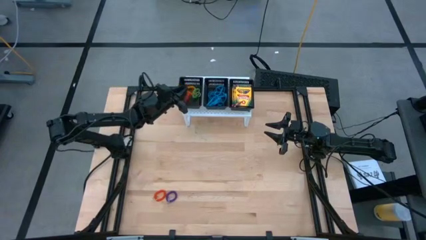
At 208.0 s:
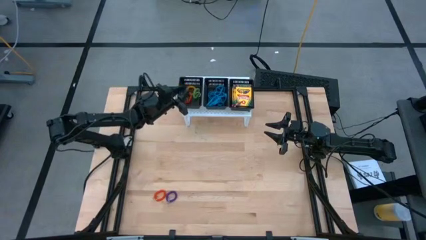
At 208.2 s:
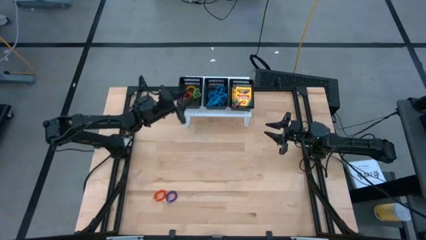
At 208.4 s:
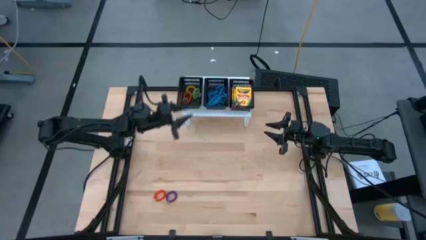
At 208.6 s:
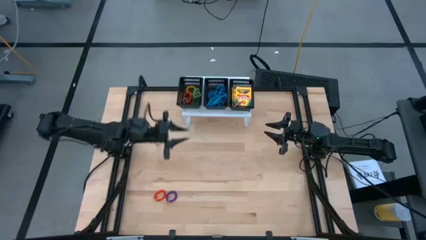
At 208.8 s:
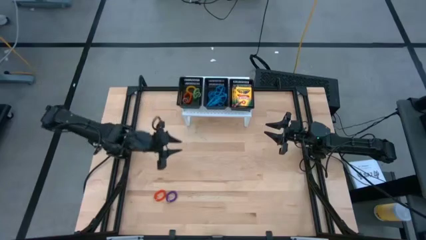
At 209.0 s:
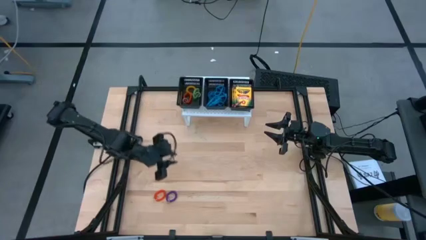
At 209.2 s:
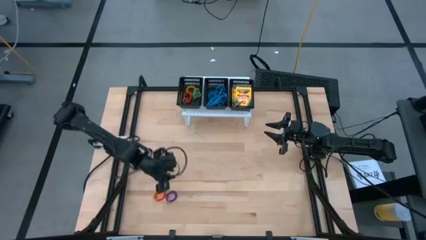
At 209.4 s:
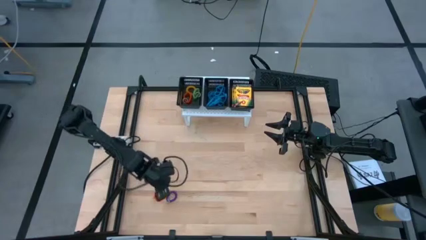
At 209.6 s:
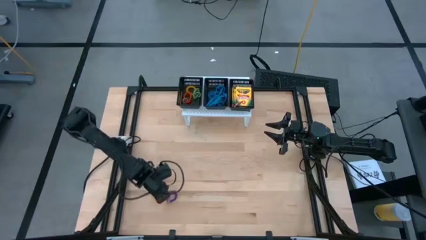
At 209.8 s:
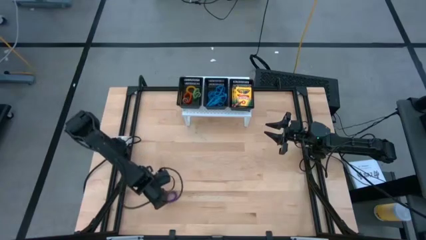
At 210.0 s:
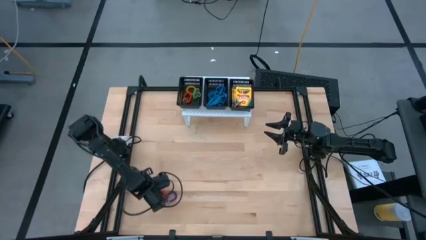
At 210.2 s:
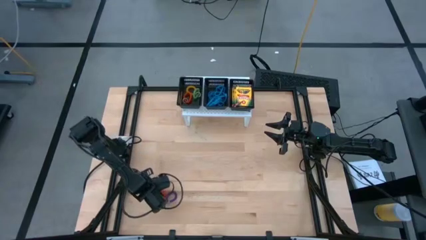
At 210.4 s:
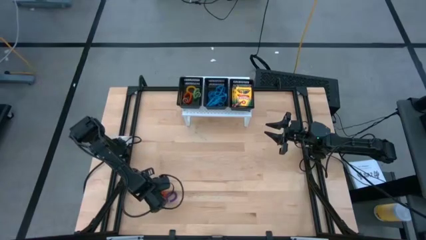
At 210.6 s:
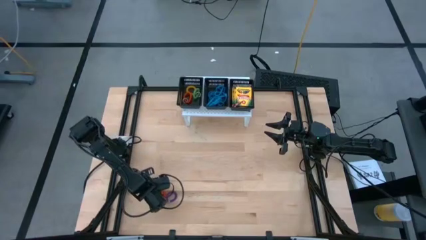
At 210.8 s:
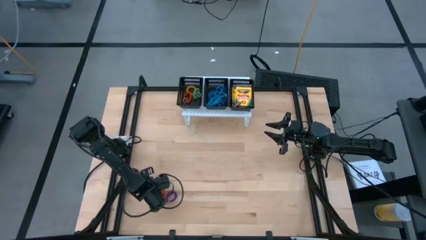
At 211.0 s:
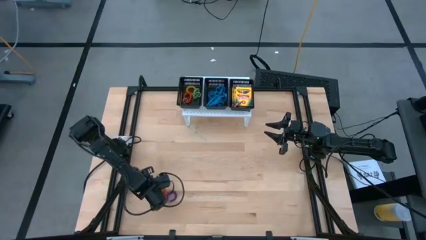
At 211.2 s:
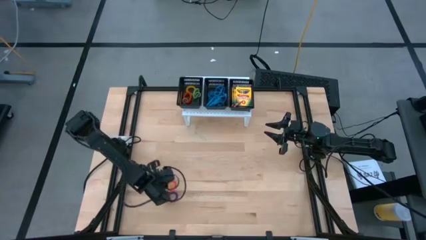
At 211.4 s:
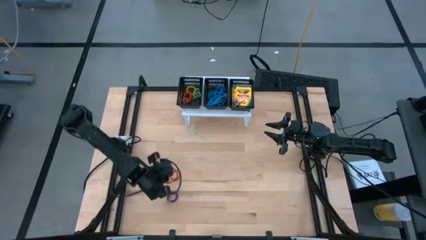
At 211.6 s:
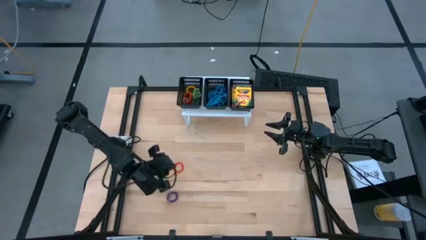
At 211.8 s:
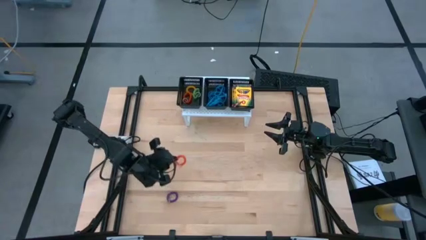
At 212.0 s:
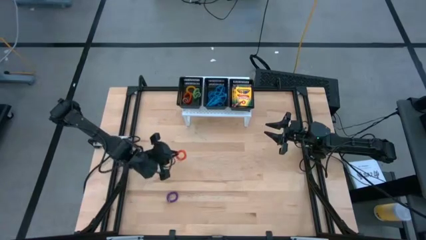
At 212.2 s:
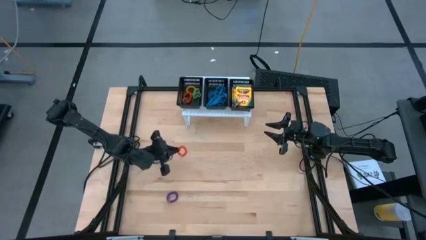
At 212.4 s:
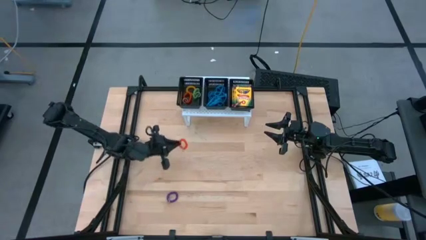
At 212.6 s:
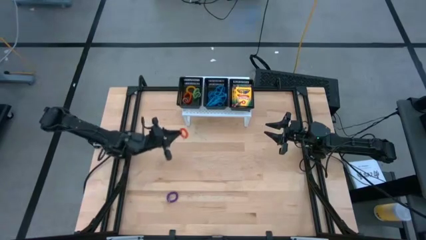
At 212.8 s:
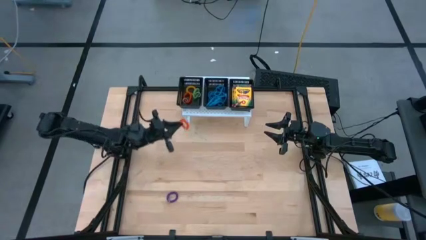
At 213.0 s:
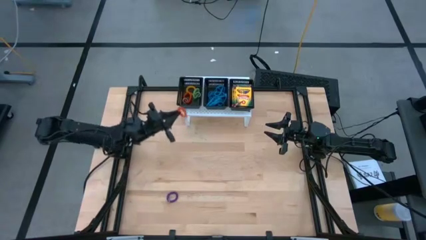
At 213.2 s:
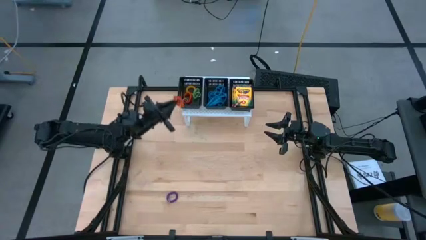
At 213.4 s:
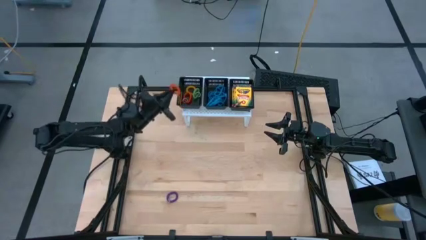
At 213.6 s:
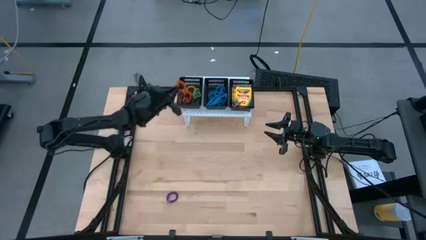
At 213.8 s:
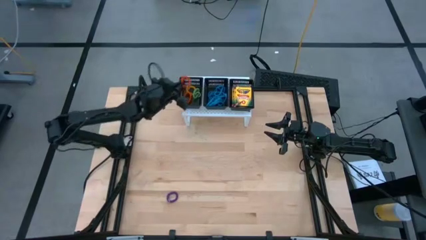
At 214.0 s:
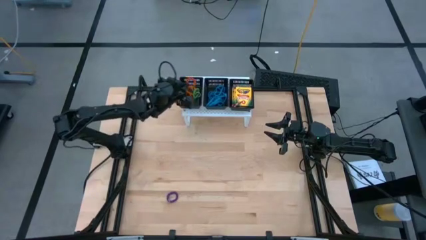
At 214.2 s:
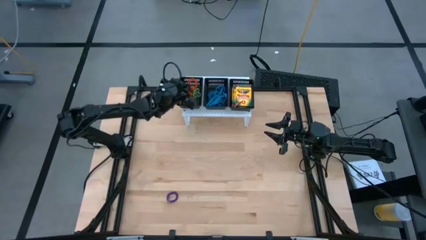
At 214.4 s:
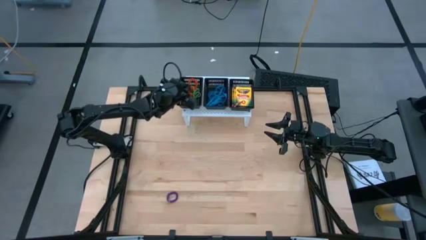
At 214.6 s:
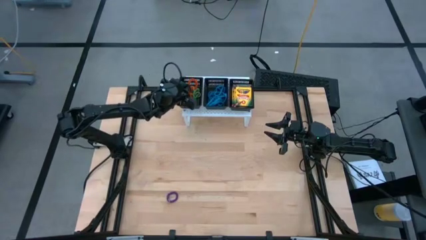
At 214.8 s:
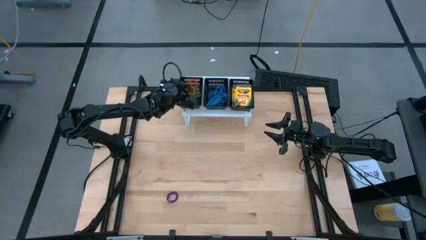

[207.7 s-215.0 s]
Task: Pick & Place Office Desk Supplies
Put the orange spring keychain into the left black bin

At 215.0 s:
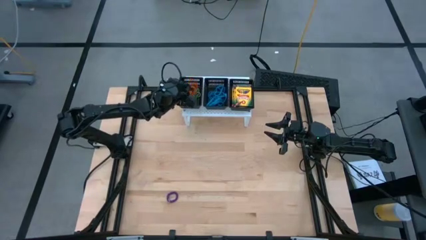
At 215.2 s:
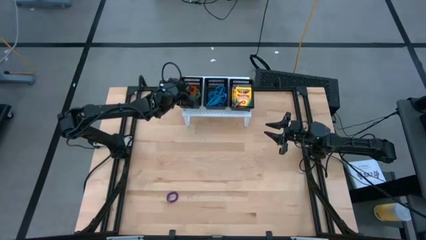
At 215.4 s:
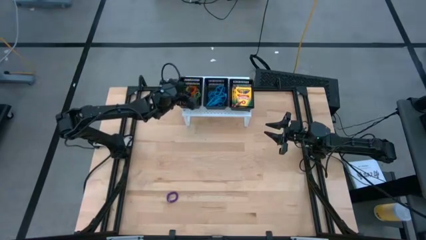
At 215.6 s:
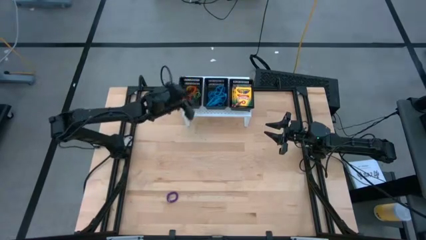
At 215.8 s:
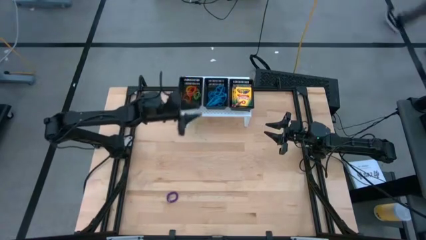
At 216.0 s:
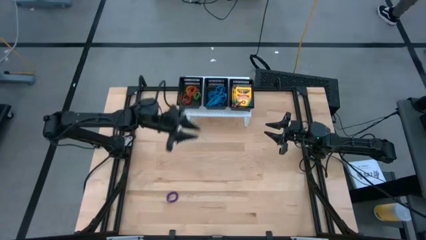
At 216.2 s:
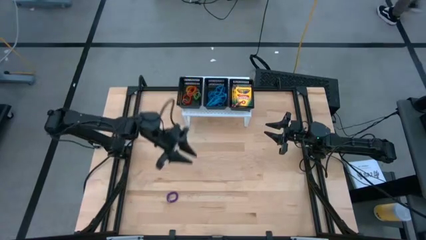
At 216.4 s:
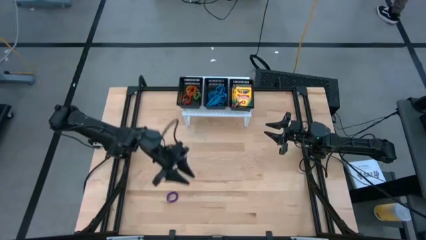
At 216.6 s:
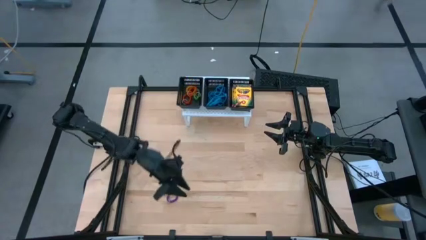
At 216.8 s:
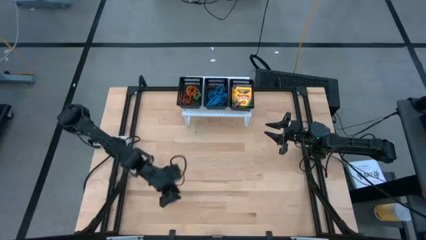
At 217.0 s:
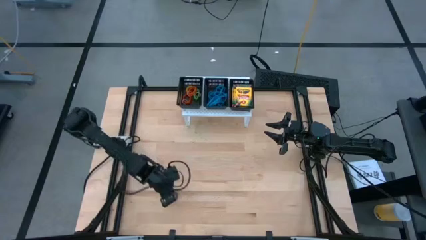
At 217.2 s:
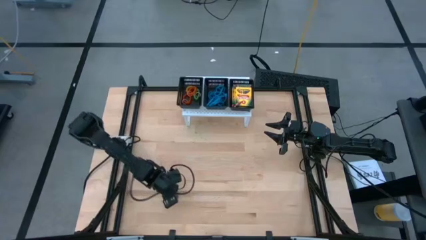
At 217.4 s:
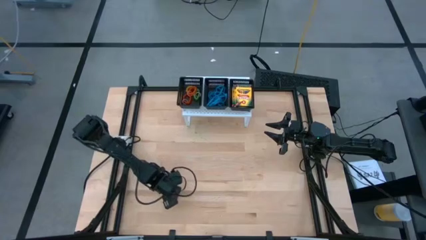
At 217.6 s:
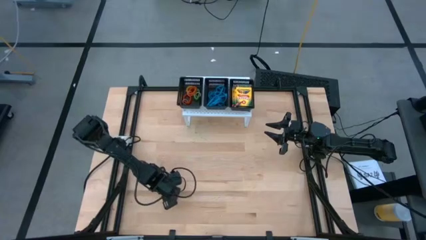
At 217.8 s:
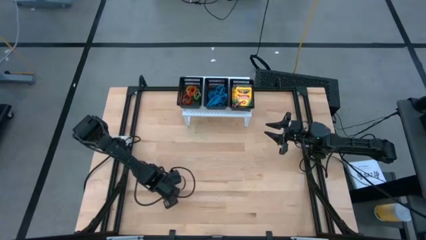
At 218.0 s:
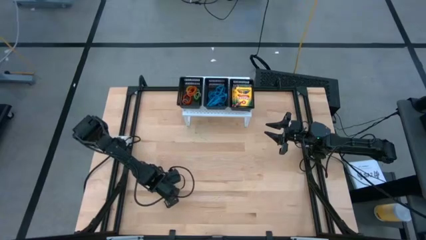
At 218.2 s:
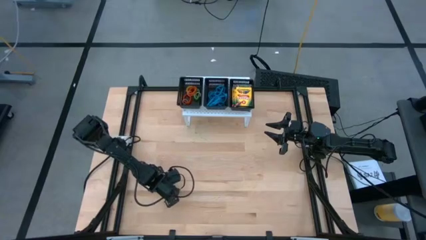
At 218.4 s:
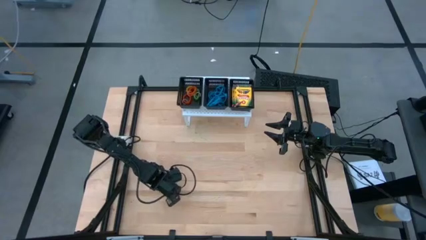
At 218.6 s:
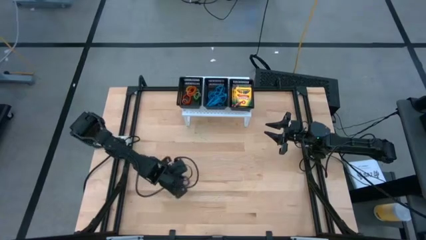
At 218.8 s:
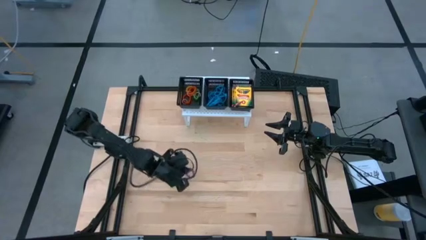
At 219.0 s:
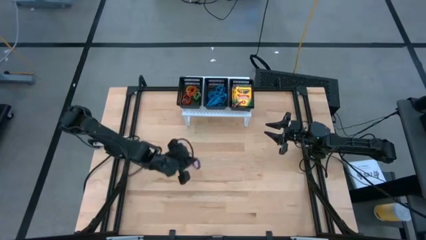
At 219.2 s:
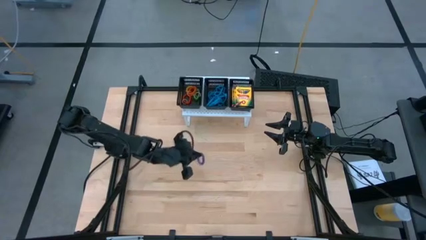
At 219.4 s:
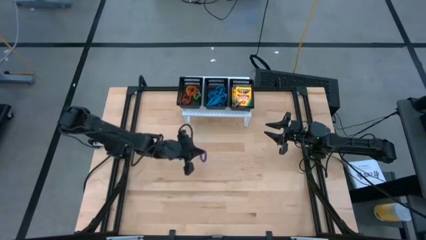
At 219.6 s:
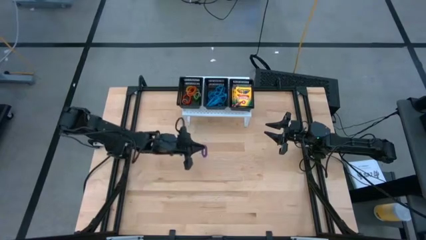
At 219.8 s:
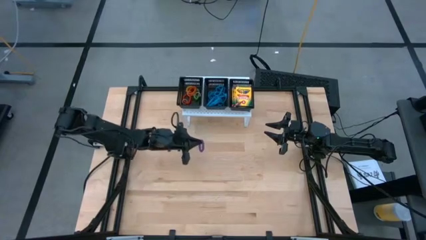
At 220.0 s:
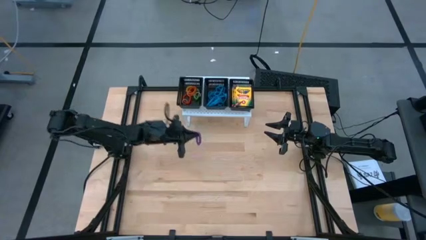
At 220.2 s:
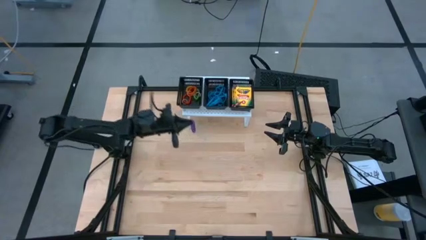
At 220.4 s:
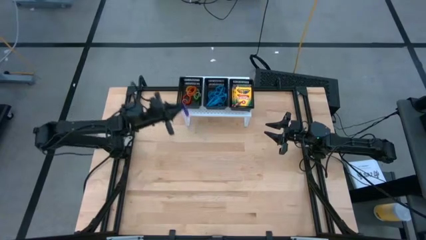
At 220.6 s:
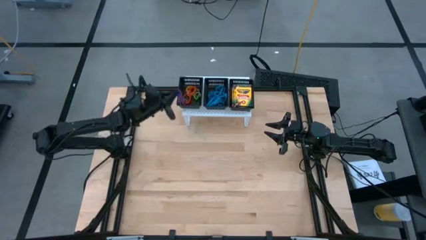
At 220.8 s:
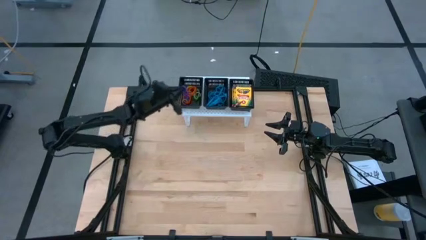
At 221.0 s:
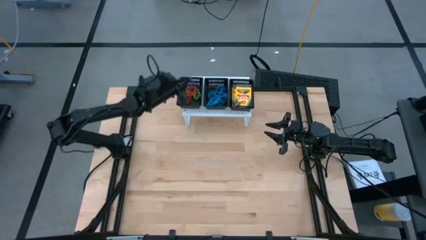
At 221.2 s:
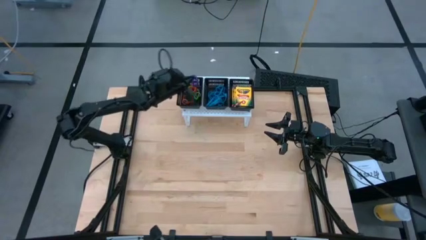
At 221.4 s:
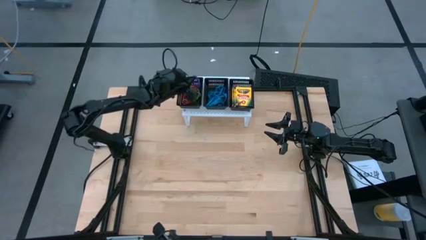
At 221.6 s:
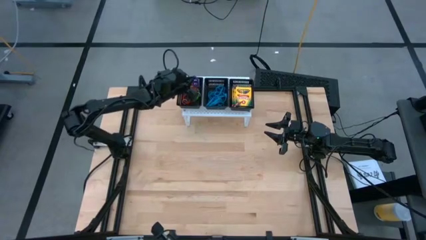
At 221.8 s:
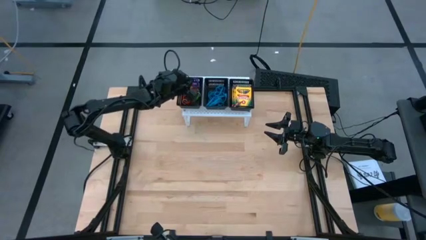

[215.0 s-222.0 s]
Put the purple spring keychain into the left black bin
